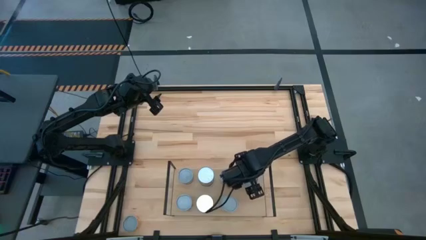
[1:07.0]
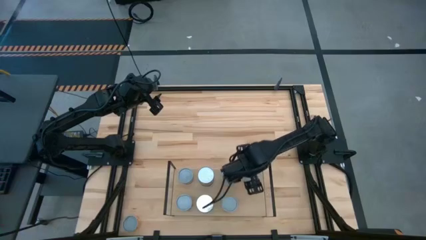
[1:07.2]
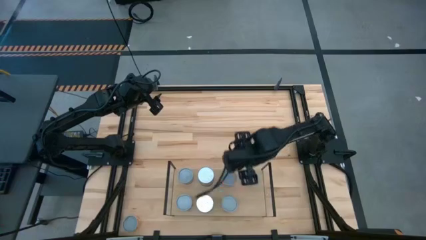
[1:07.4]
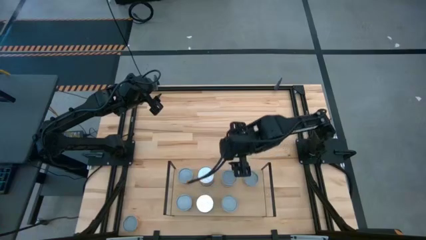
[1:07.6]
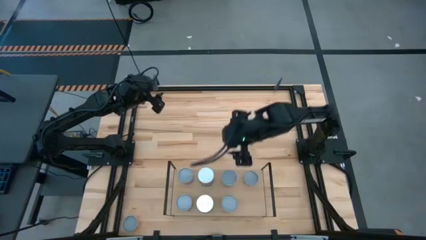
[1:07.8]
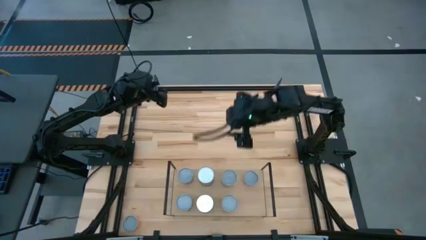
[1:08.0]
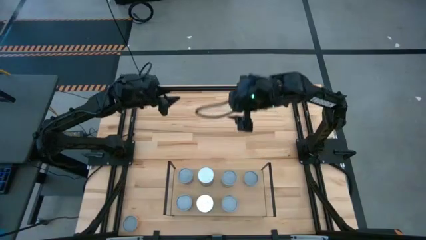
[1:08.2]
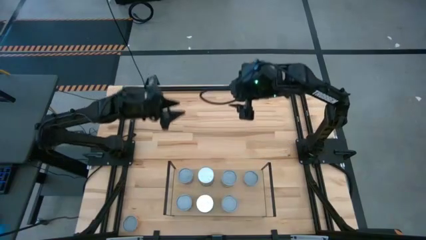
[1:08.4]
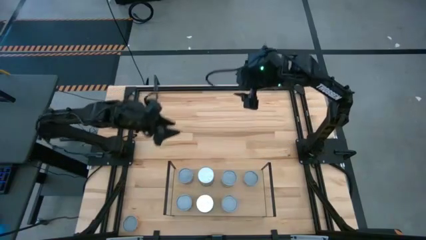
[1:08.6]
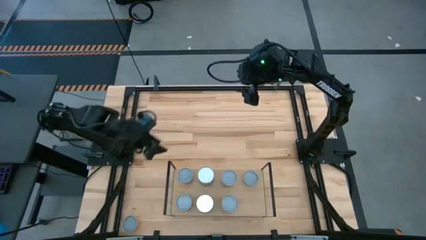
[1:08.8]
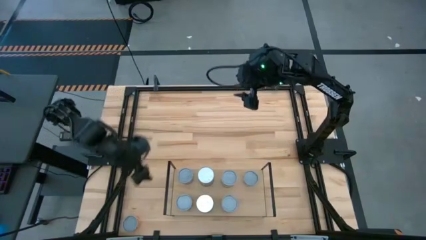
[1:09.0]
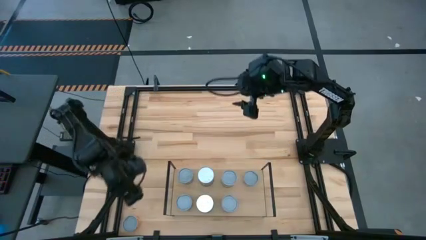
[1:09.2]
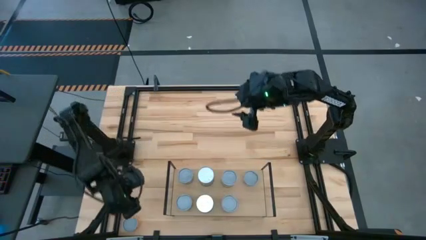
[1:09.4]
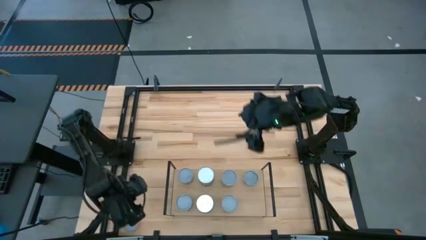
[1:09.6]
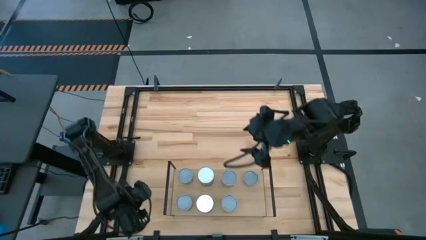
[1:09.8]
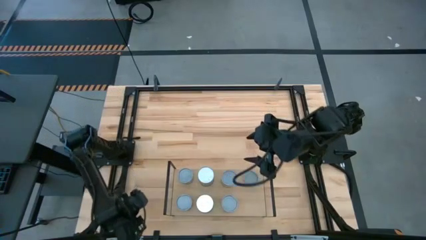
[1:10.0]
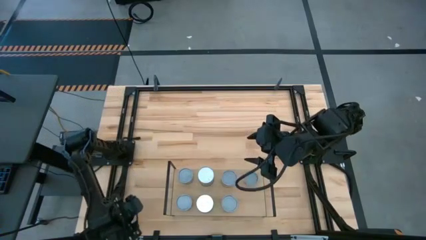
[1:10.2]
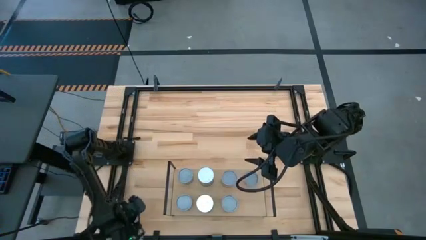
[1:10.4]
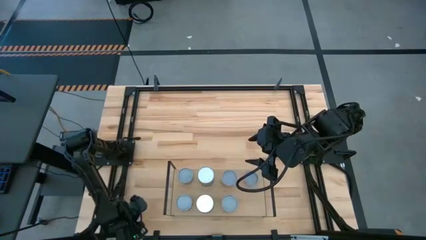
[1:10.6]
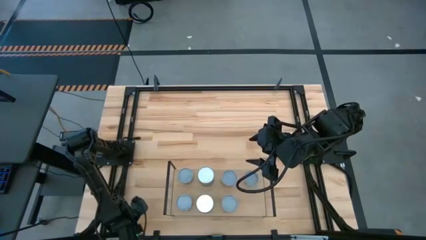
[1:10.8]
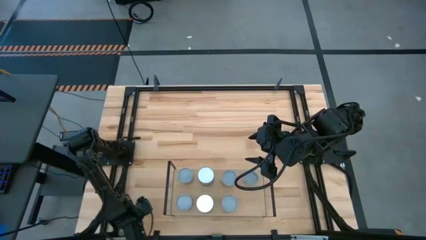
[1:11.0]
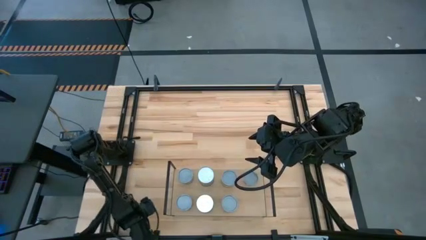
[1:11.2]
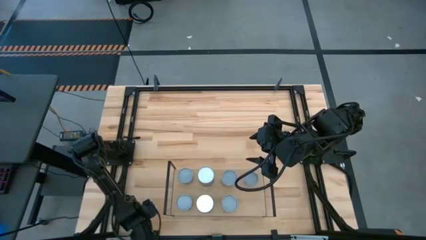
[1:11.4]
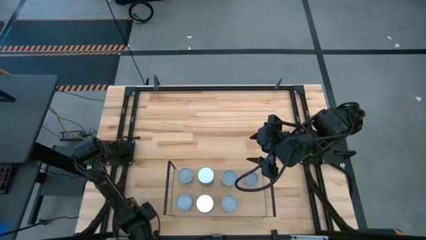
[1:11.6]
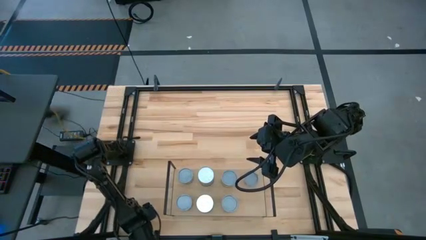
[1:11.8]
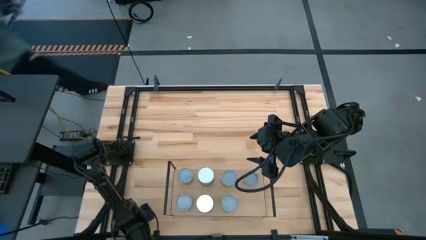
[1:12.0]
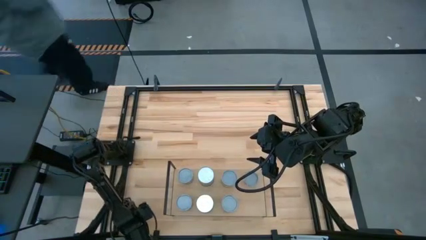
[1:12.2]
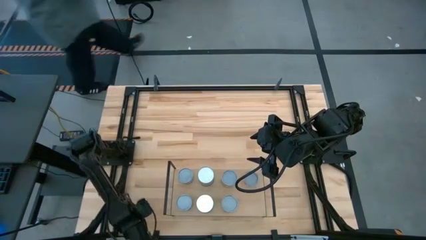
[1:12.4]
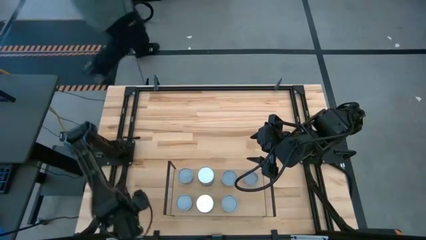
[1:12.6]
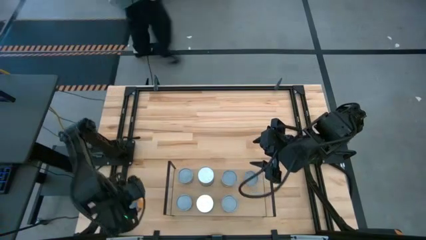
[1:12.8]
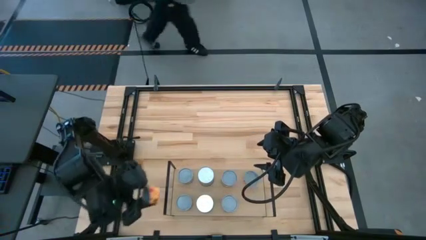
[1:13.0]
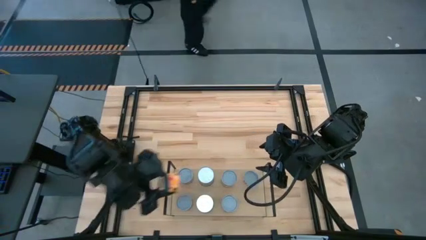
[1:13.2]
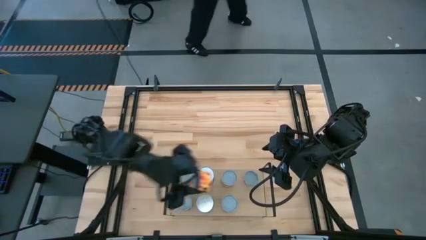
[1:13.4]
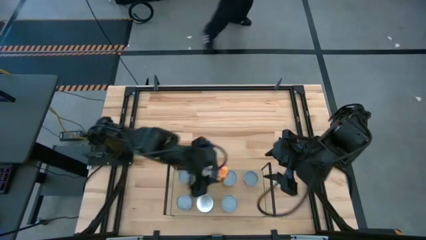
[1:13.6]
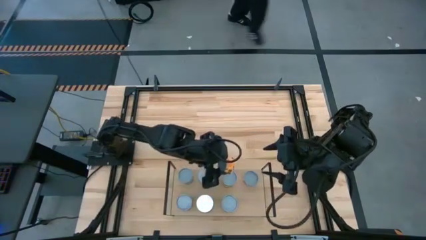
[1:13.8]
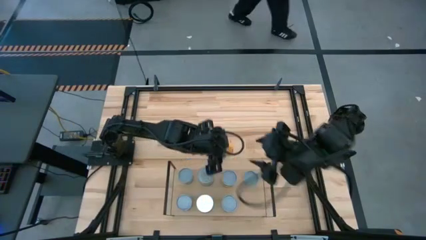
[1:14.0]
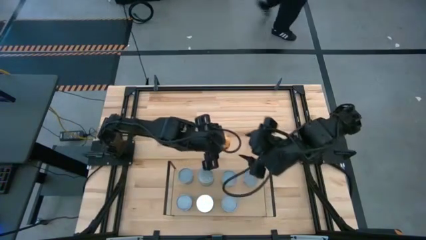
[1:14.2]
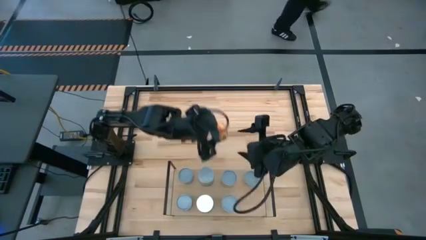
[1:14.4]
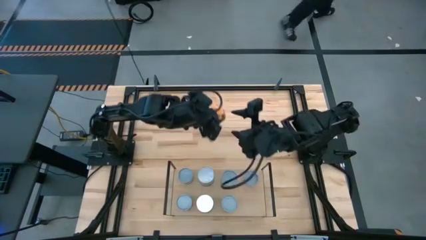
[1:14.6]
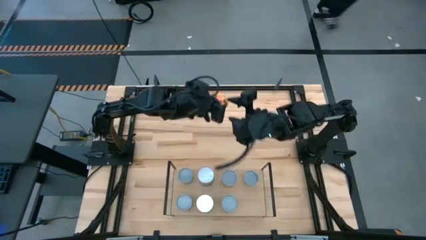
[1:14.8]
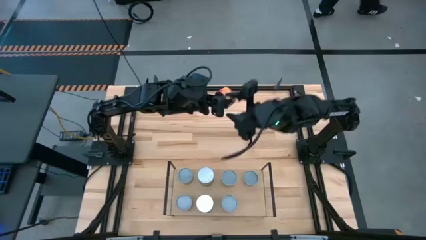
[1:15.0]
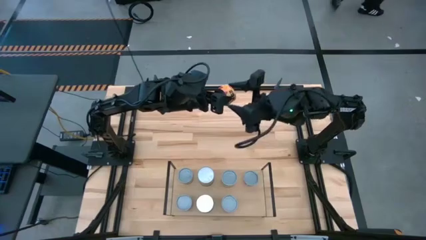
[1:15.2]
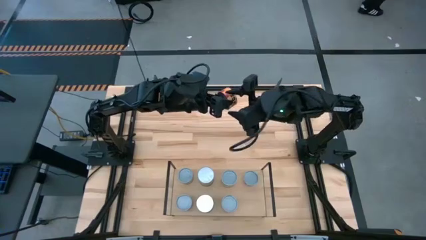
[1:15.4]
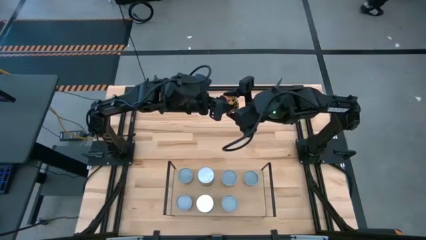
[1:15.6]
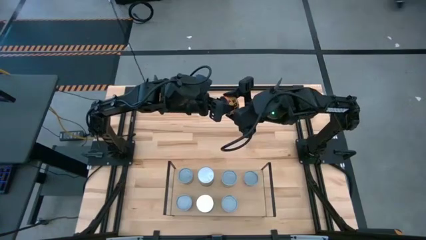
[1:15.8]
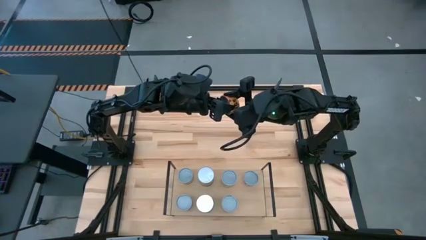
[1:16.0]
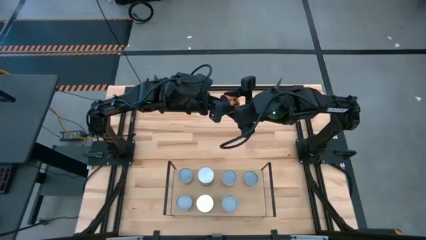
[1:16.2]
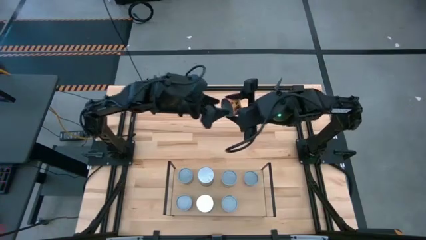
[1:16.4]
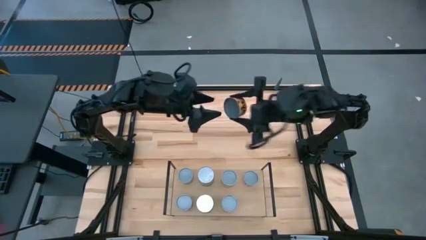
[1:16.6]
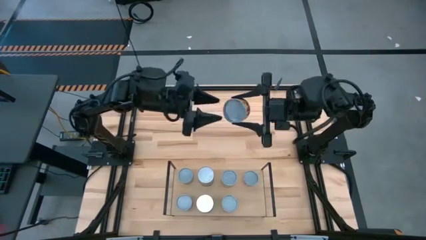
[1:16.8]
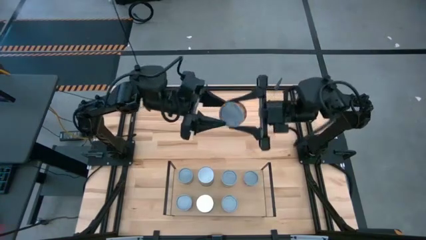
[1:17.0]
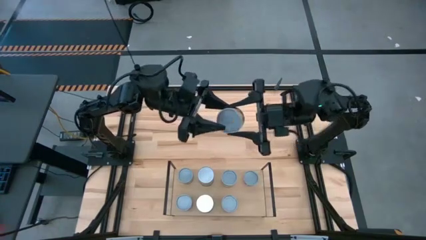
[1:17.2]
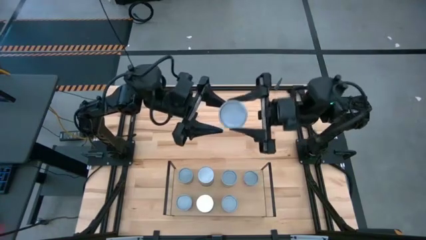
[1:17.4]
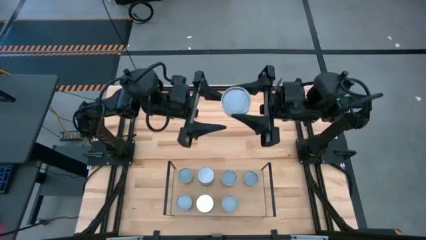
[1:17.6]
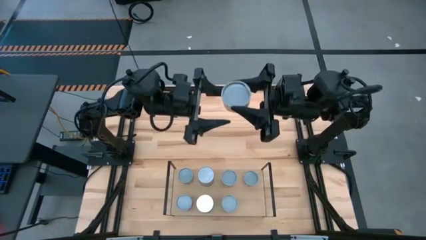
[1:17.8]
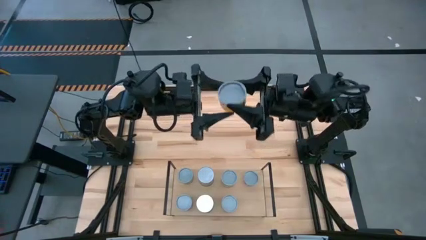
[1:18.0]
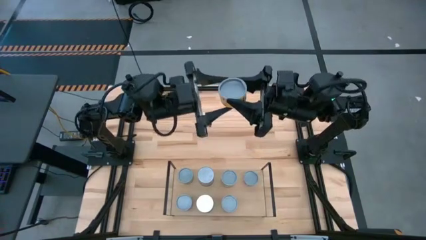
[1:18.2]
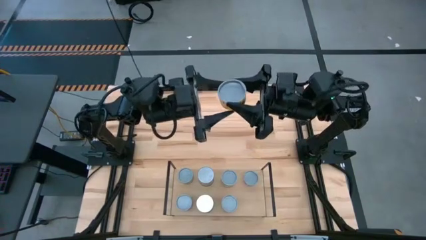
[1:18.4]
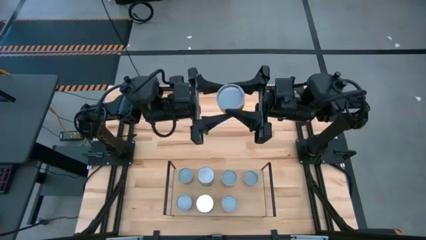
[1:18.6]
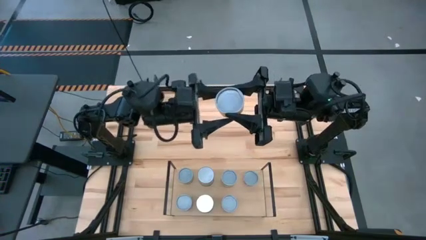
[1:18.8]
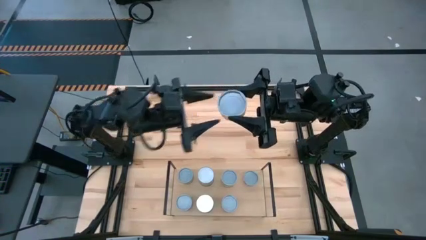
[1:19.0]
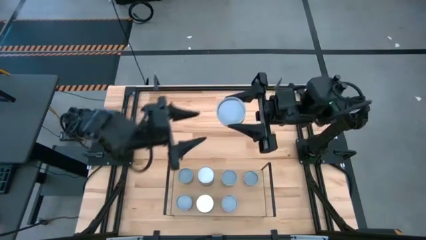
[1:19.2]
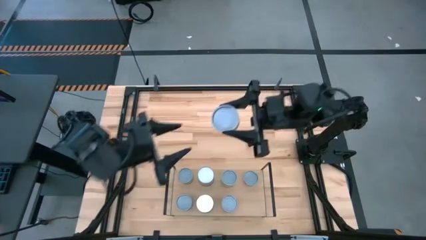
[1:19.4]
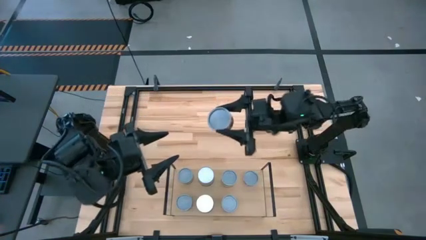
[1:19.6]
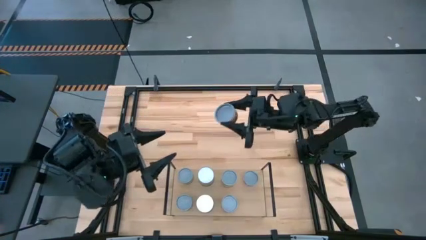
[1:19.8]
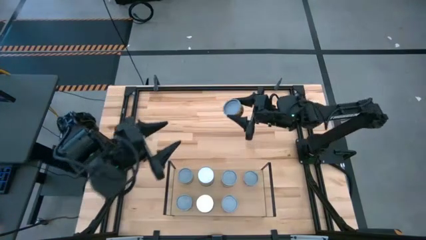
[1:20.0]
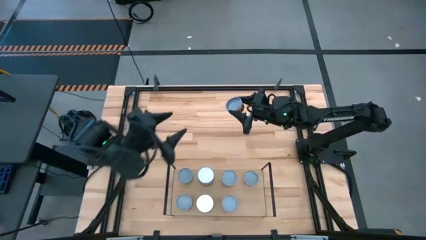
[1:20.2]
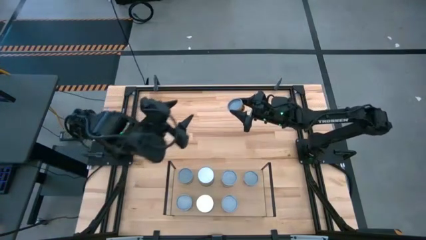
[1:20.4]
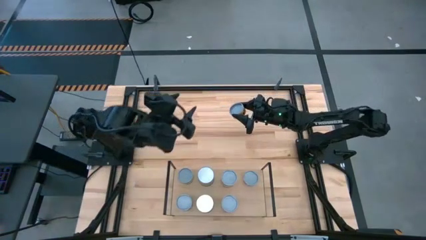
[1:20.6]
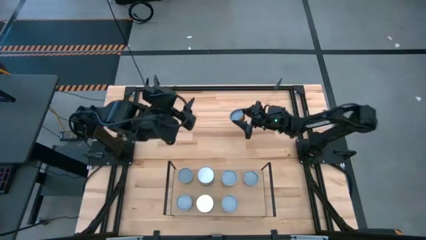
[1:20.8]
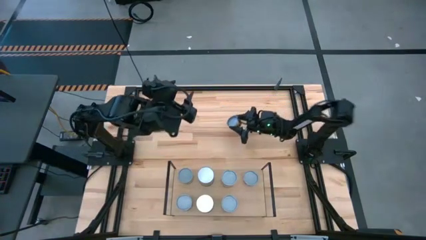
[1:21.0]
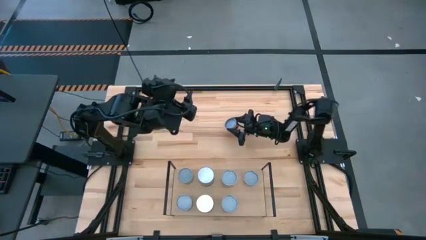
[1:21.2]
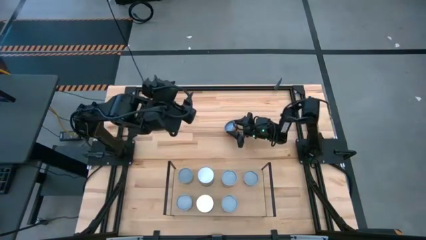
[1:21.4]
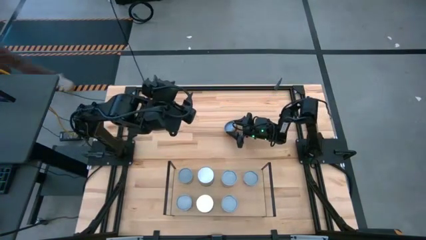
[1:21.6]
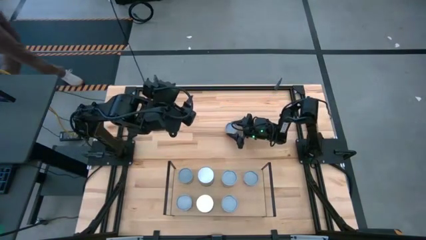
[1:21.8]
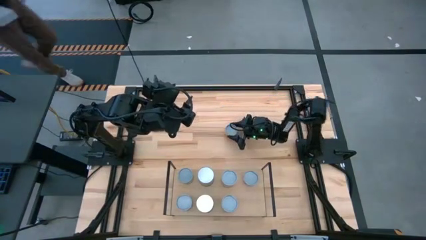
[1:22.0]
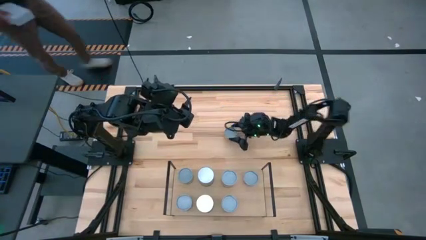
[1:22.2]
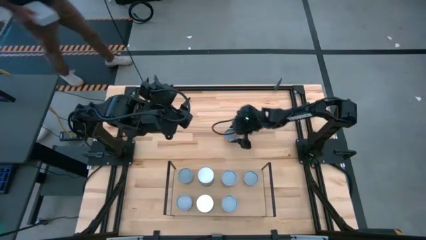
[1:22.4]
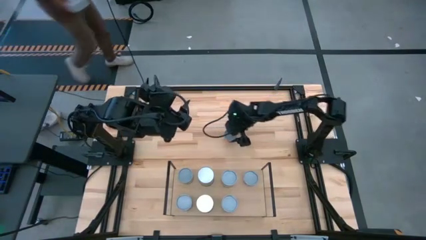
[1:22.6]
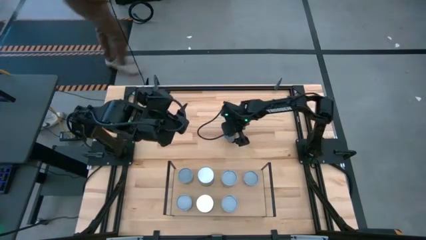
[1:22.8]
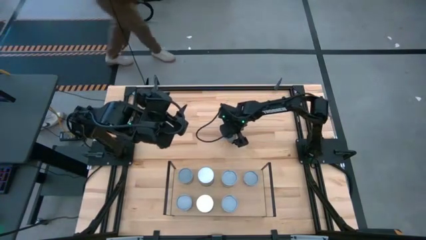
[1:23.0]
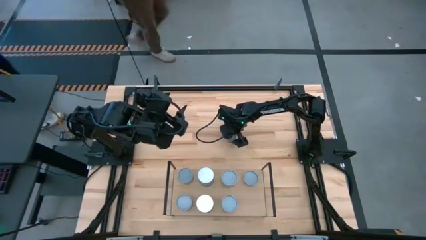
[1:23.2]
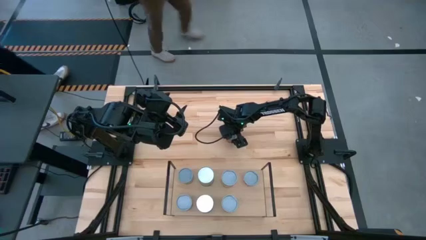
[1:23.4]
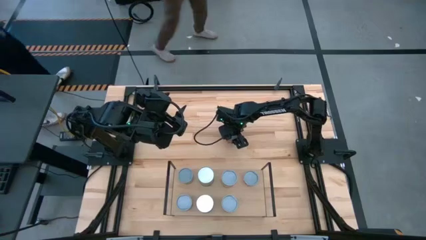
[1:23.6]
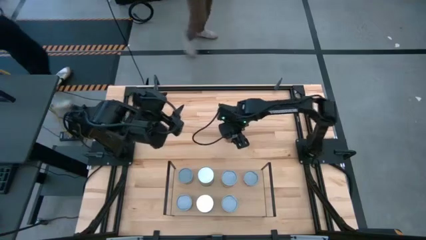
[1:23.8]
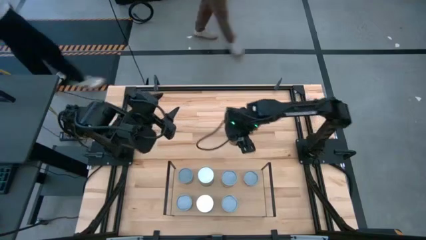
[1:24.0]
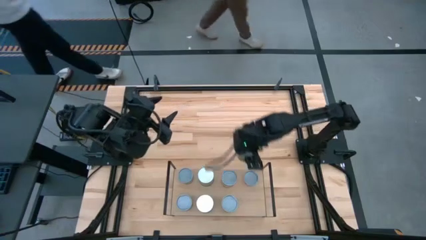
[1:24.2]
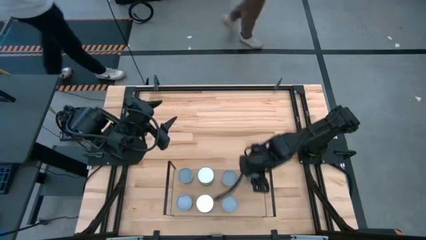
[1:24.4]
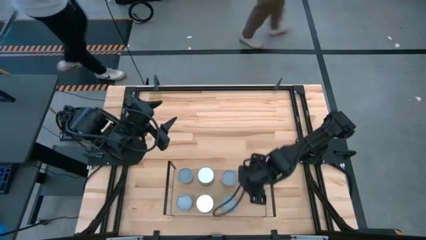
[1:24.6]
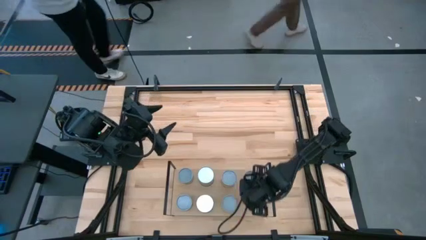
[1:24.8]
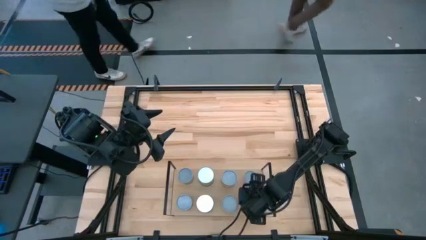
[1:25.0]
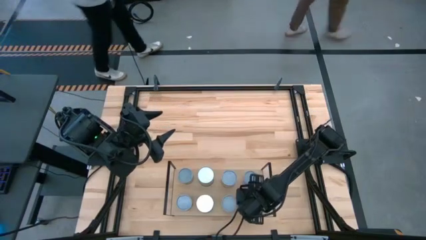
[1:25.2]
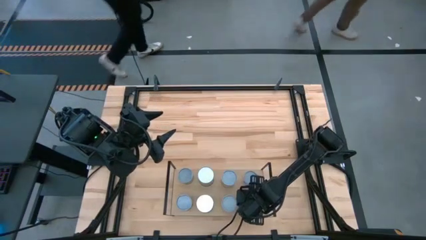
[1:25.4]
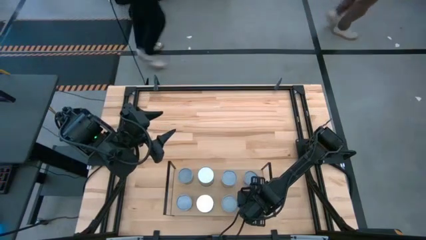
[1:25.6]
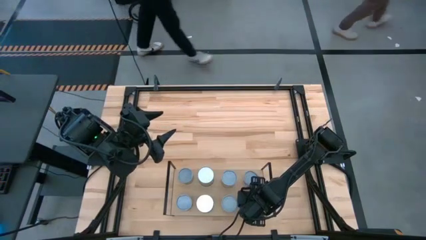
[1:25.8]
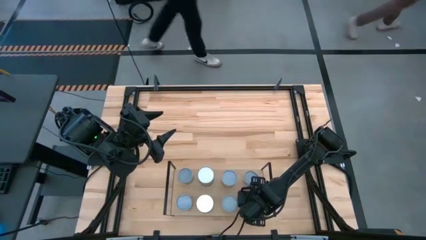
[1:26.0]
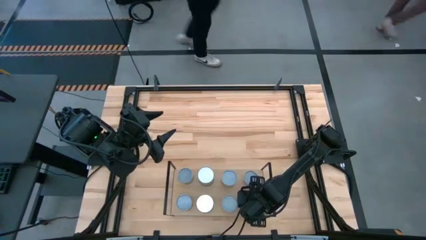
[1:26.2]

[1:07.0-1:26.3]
Task: Pick and place cans onto a shelf
Put the canned pineapple rings on the shelf
